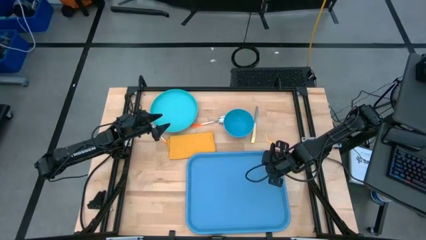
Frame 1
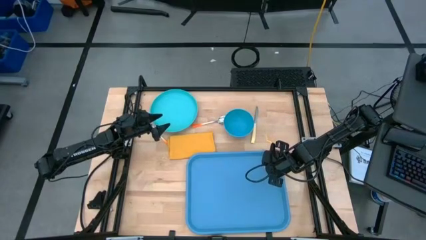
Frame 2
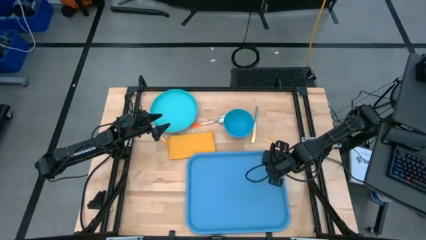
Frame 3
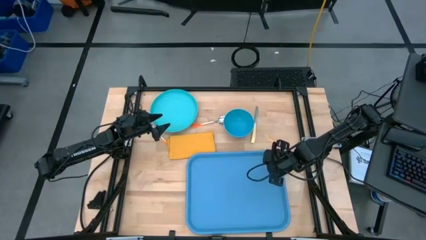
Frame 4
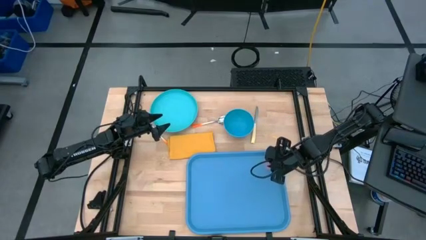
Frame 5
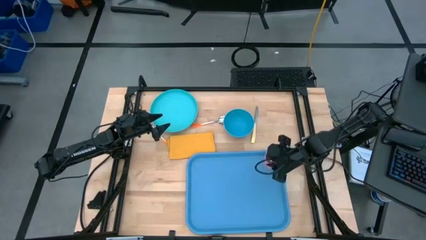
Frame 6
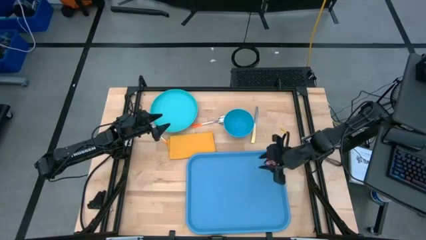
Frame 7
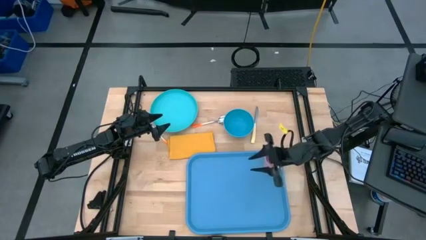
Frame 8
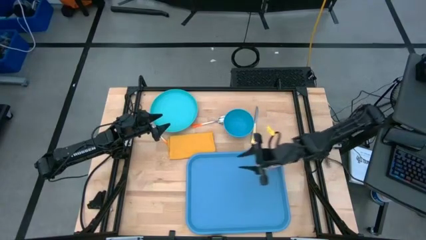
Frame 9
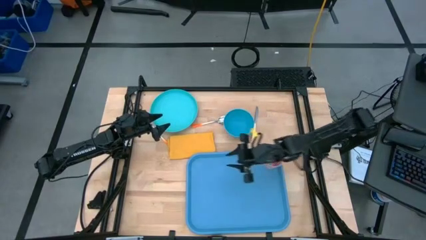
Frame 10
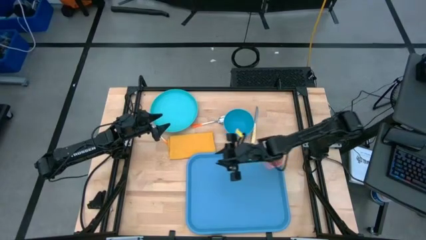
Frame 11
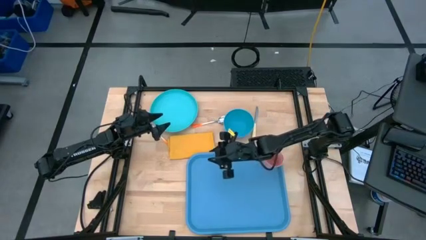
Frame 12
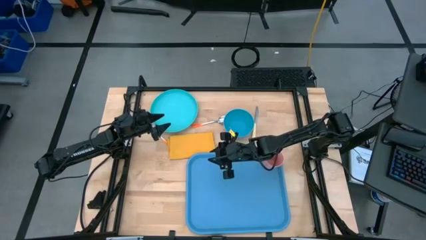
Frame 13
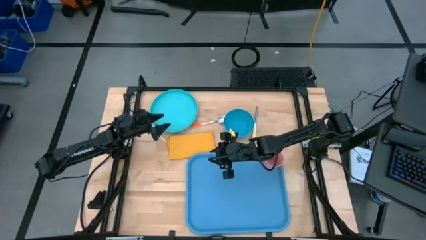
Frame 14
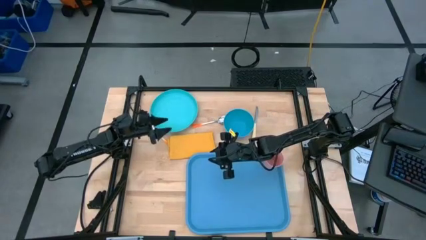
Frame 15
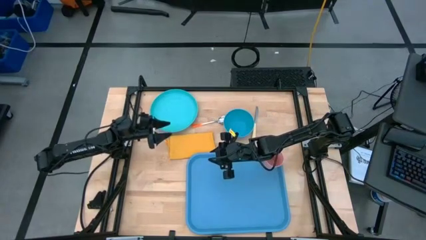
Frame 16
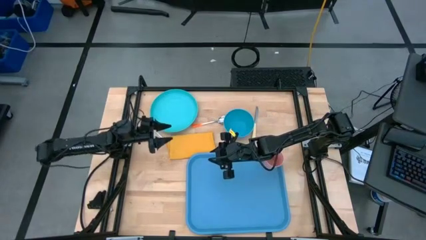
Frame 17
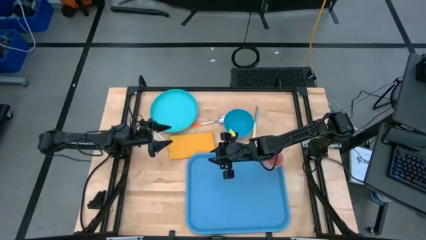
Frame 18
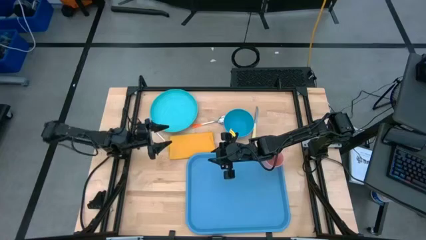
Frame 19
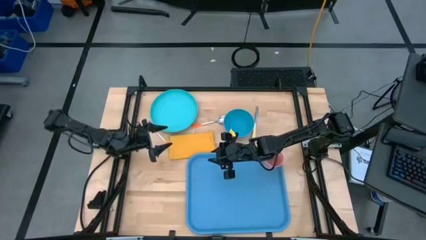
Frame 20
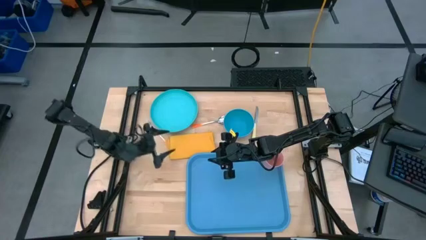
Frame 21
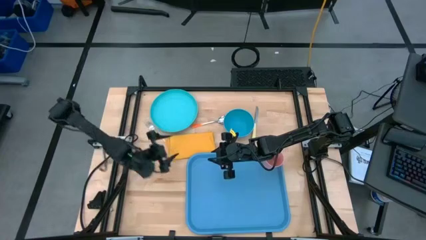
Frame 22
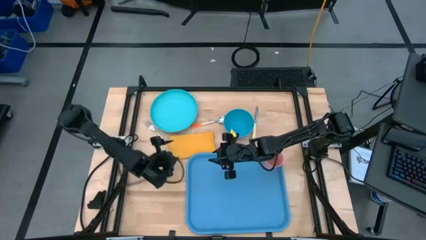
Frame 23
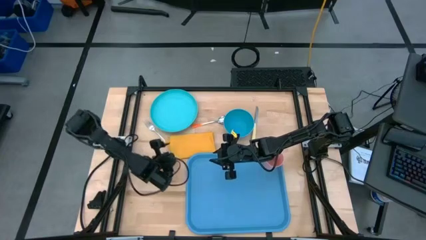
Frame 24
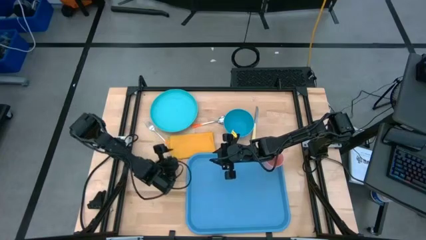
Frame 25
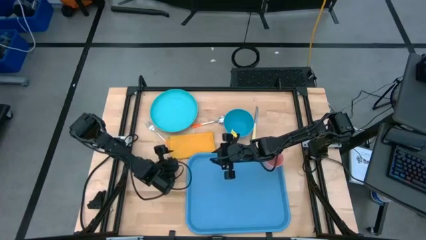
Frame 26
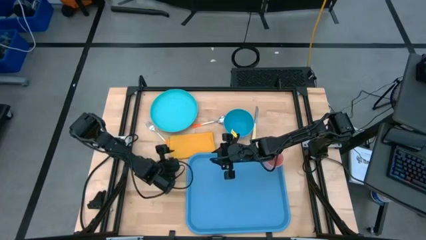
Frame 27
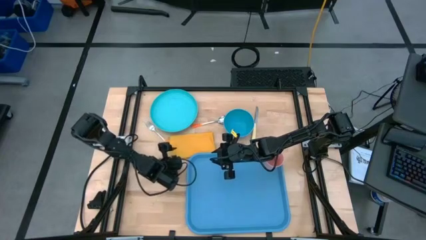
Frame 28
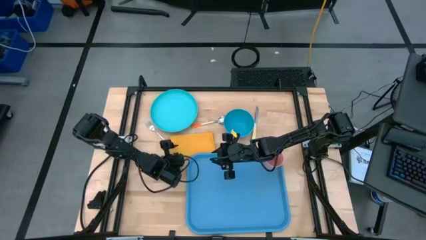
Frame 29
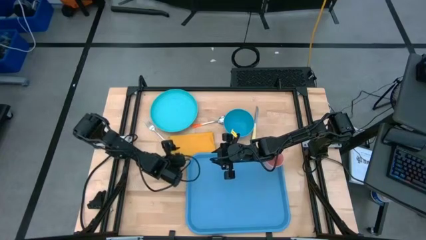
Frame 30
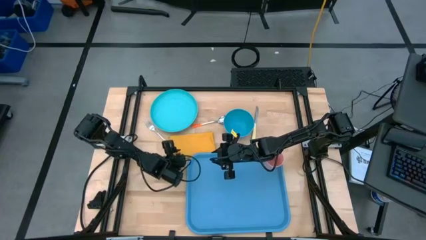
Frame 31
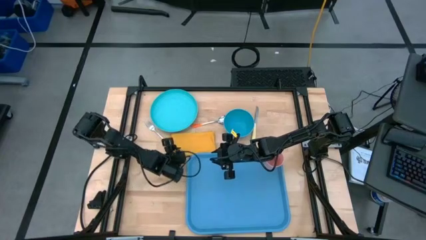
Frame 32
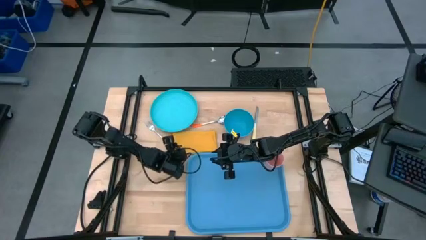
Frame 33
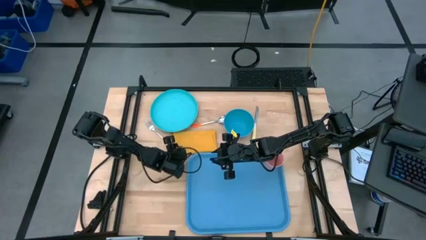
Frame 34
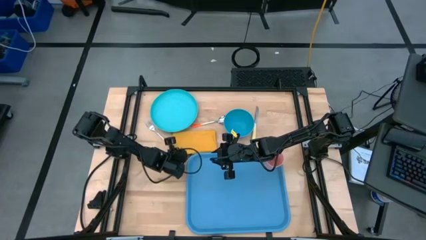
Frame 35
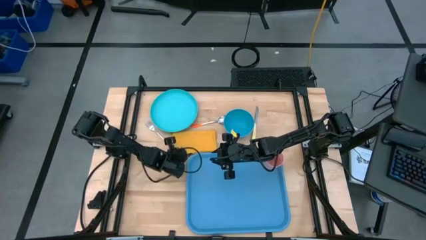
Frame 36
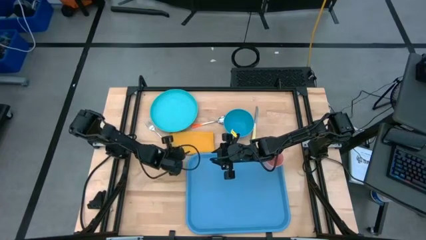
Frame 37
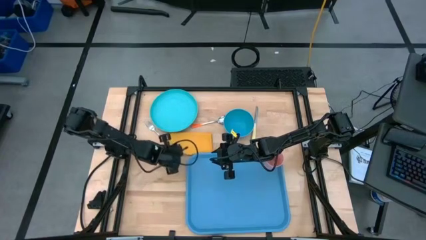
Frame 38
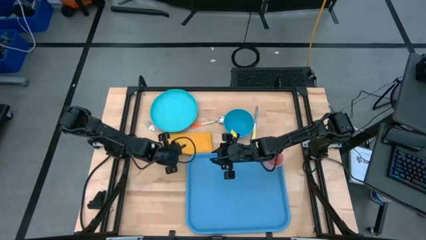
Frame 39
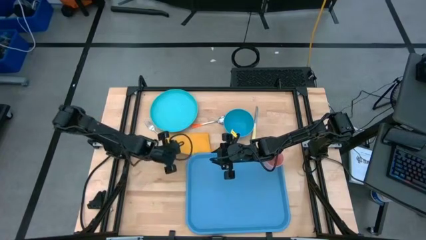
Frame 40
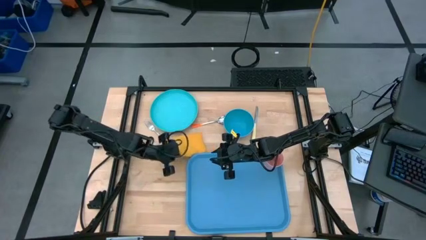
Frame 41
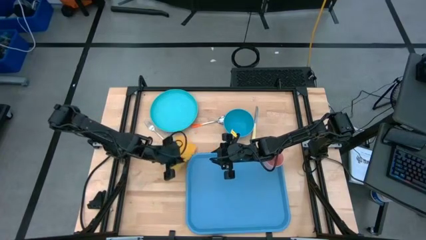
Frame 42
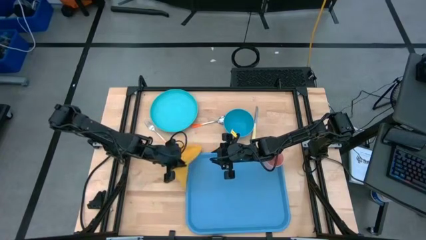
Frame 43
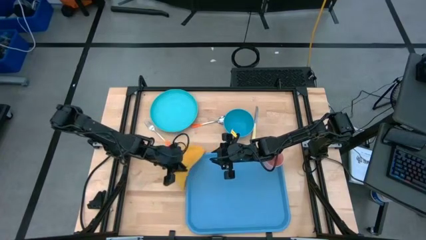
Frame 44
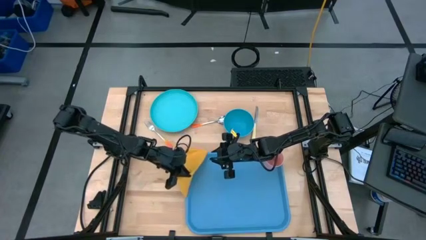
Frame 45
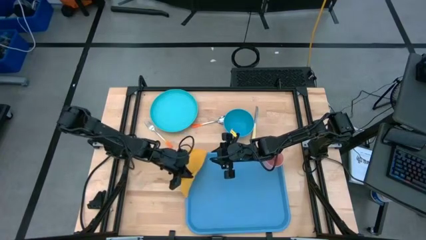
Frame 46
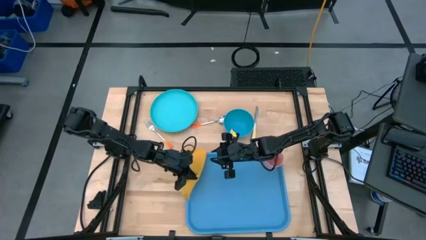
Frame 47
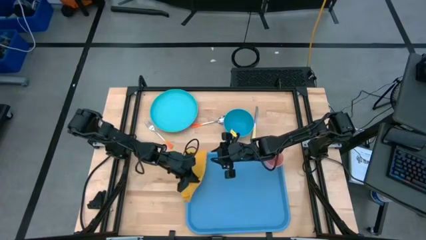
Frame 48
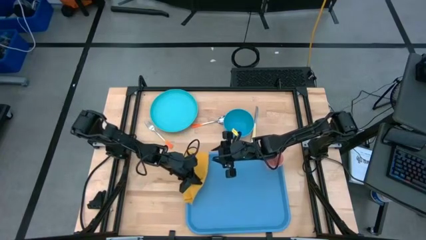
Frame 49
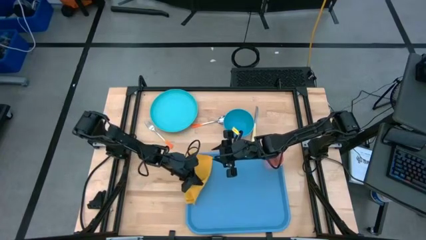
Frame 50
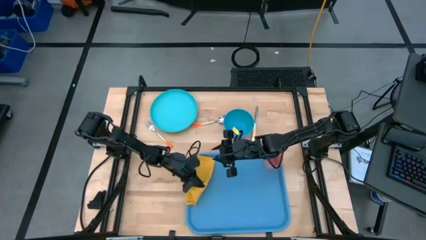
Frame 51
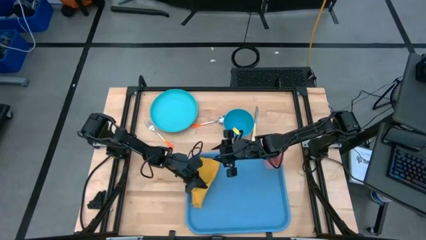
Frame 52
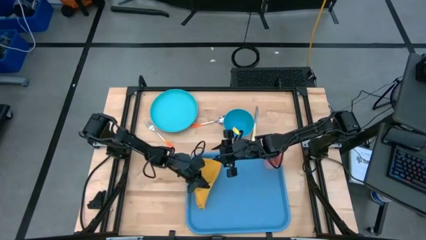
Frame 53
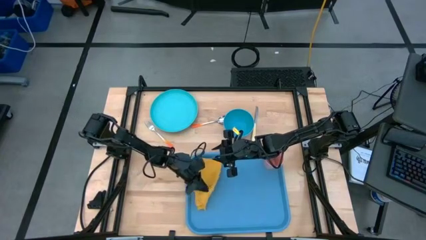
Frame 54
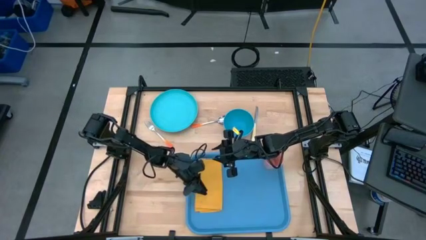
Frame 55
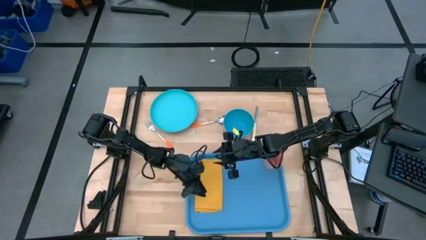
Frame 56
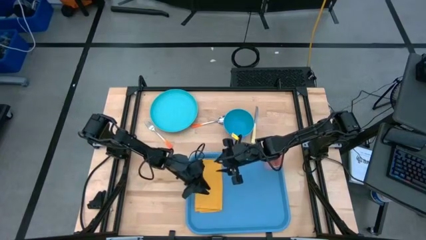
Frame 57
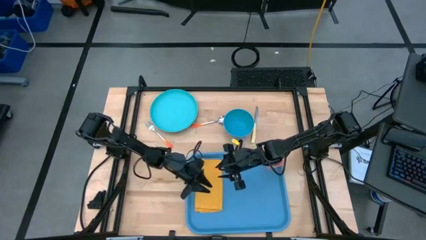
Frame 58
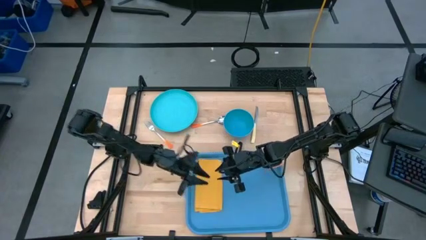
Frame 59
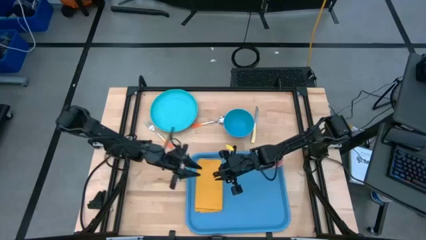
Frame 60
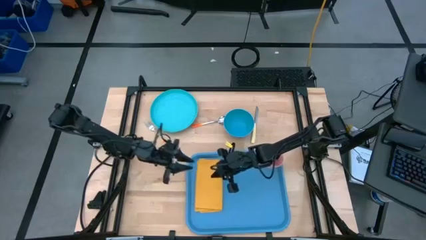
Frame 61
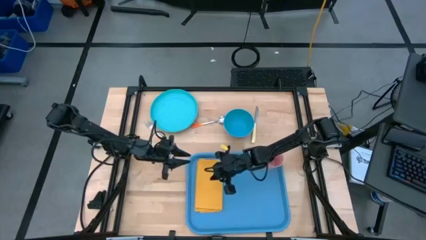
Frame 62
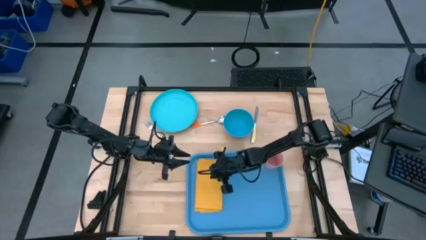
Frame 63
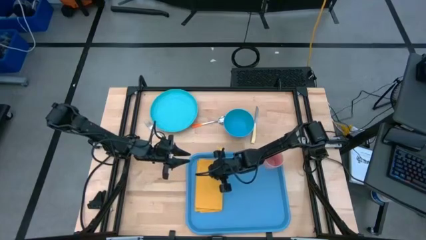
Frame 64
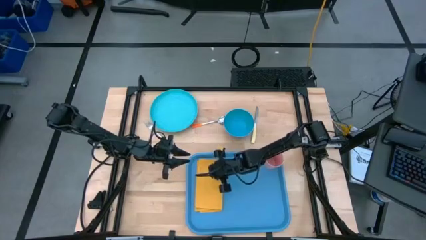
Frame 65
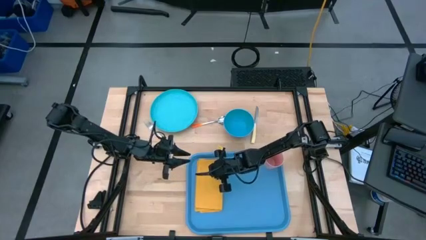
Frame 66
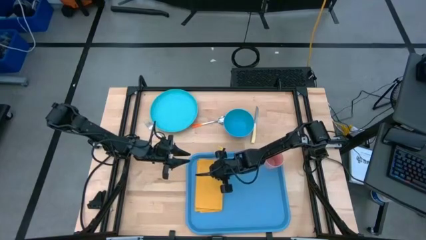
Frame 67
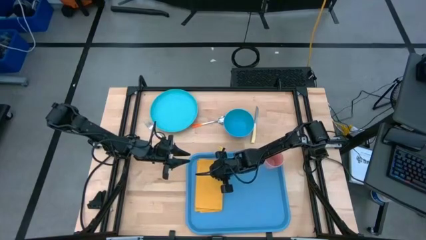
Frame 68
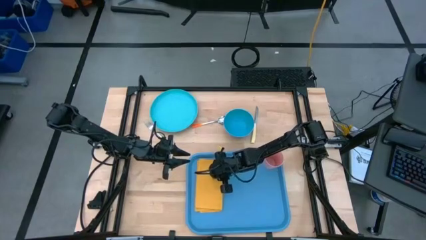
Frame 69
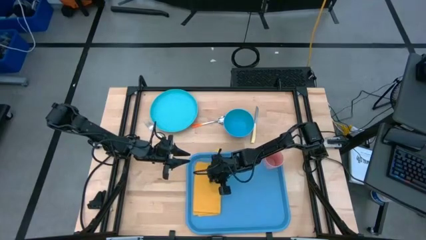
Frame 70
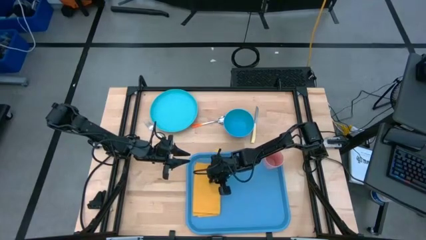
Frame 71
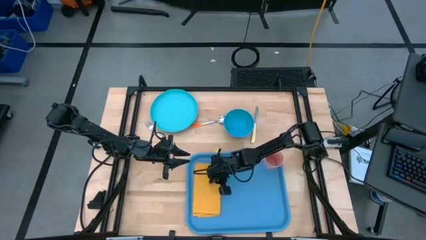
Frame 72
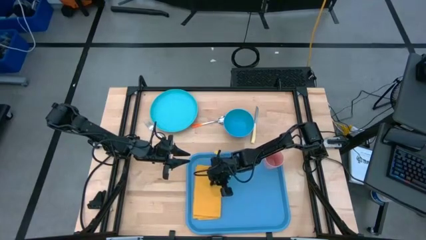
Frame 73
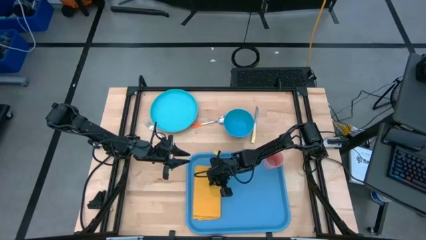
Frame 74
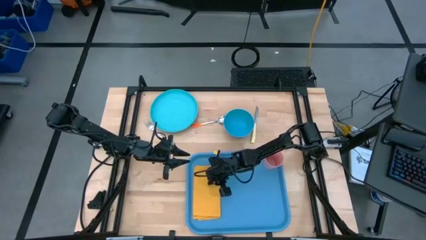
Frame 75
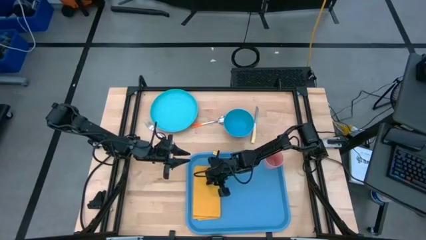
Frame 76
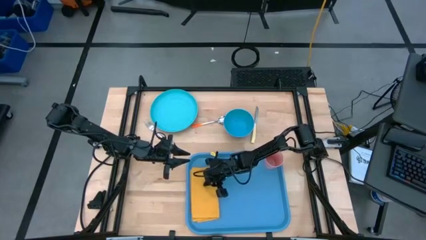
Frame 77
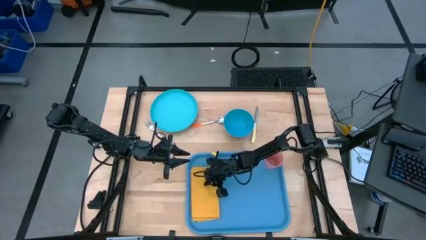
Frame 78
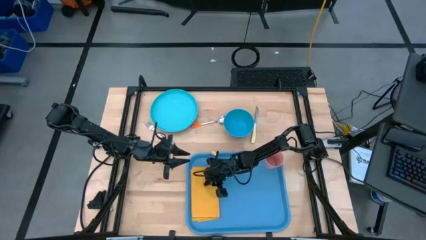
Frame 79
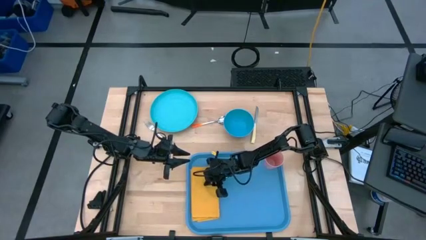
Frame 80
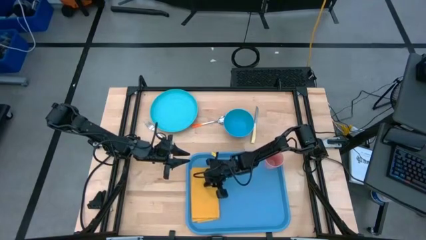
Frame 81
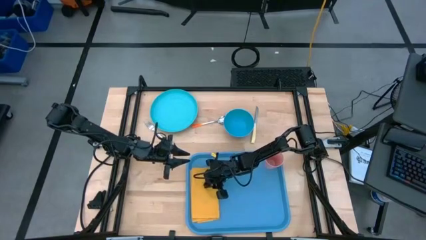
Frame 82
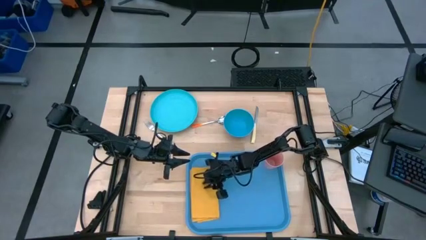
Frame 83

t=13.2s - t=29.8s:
Task: Set up tray
Put the orange napkin on the left of the blue serving tray
